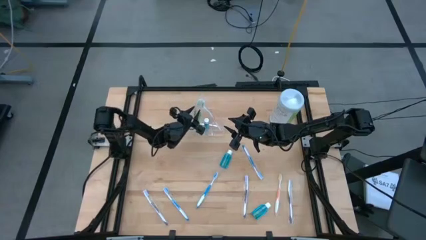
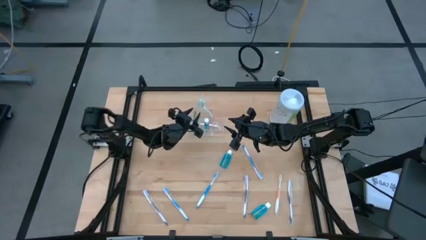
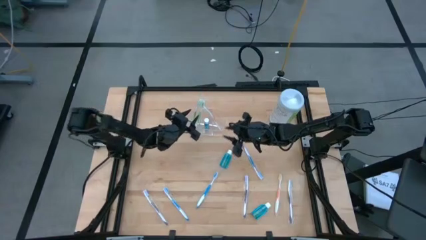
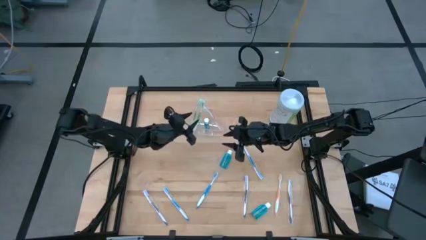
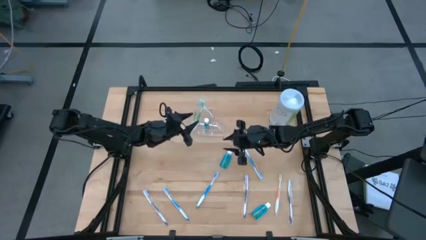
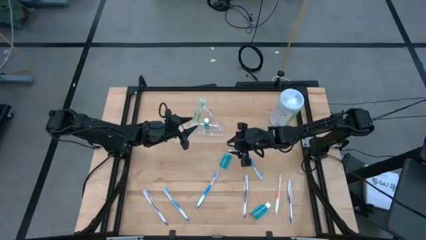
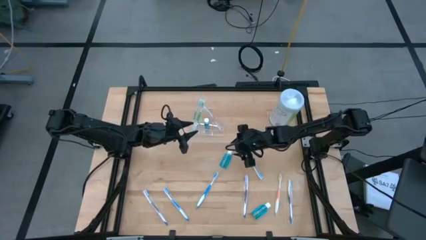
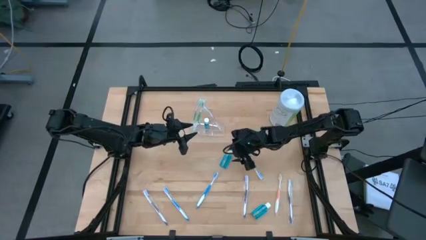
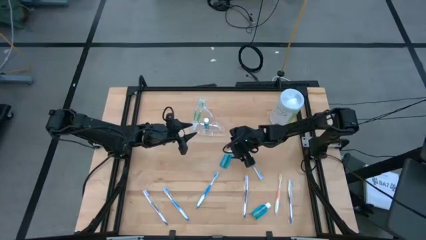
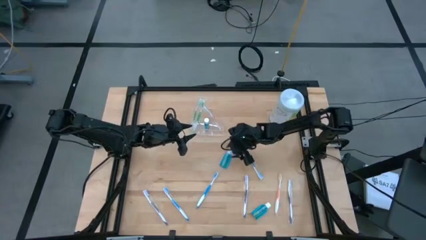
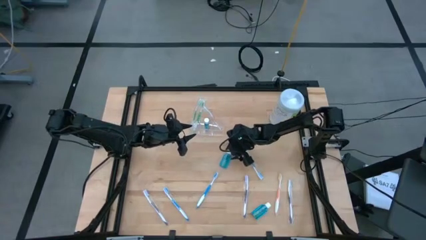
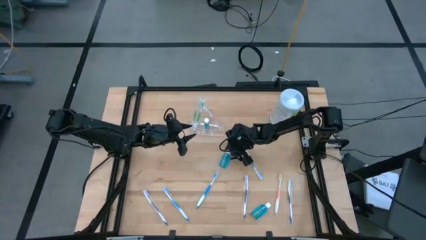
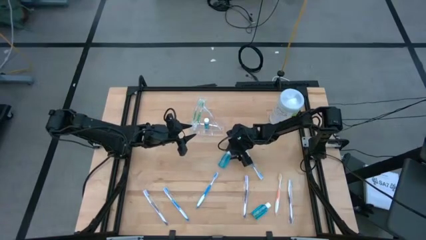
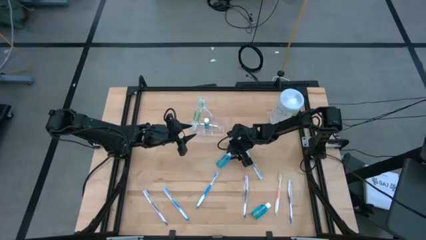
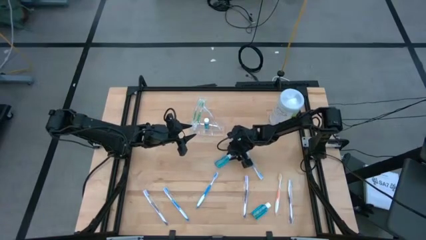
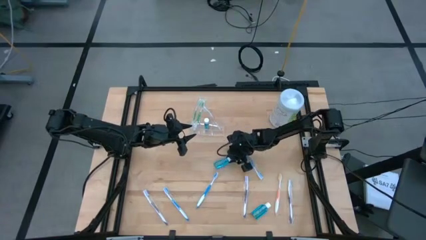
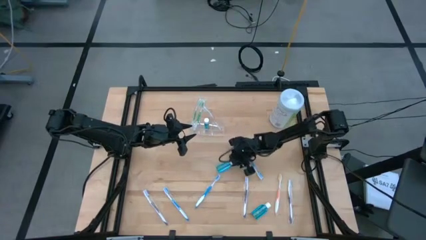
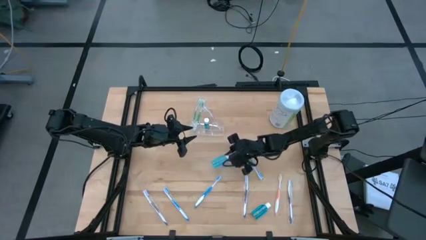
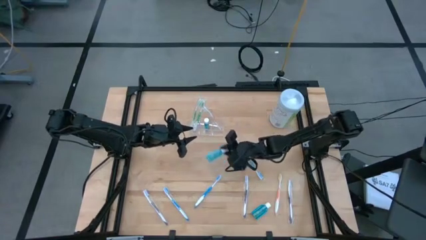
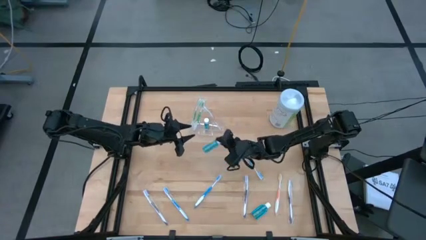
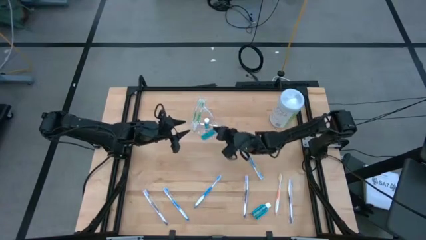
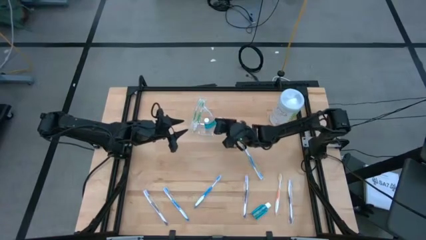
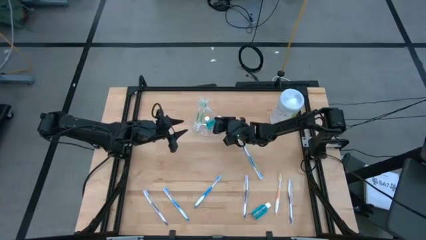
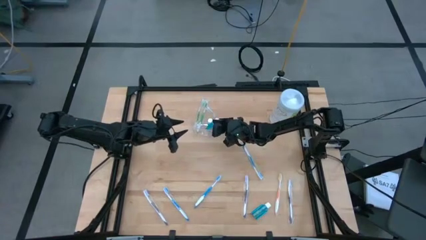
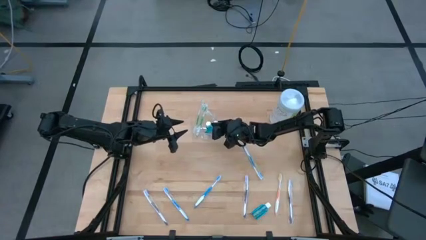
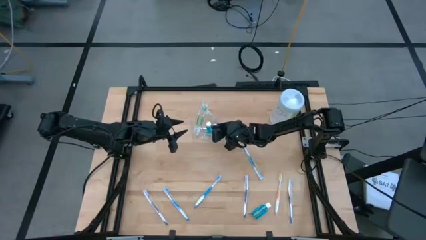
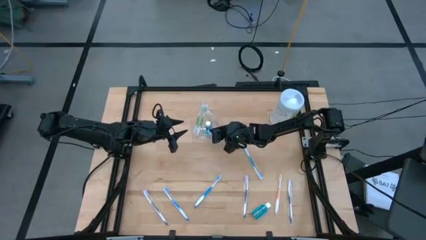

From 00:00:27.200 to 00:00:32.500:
Task: Pick & Place toothbrushing station
Put the blue mouthwash into the middle section of the transparent organizer

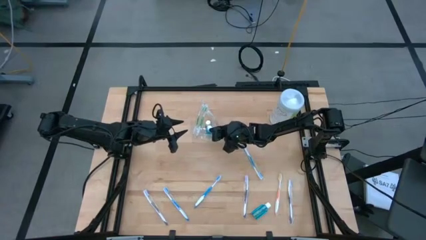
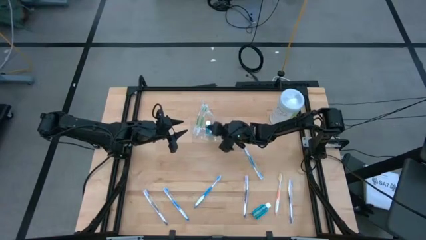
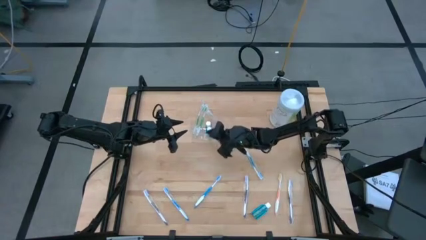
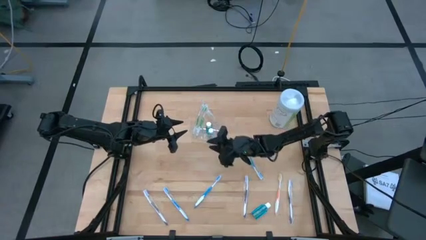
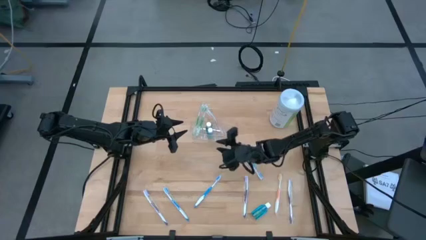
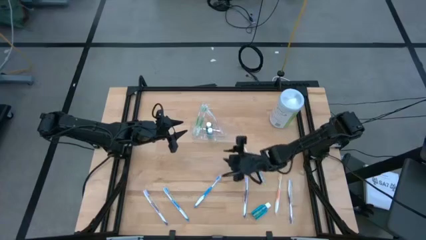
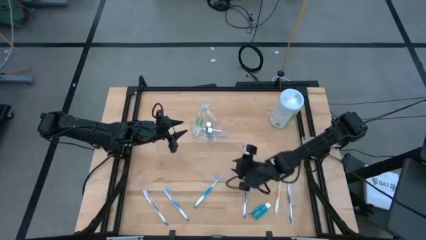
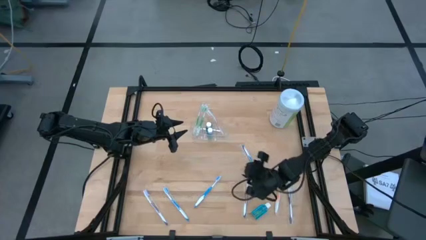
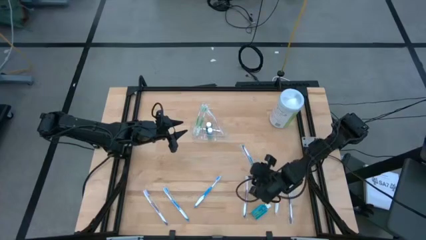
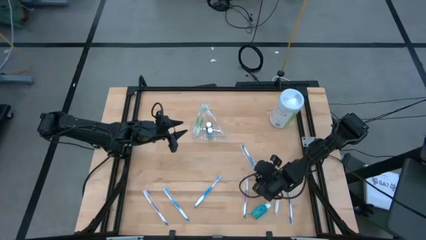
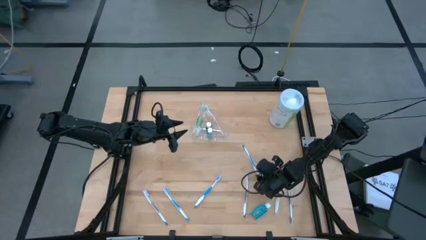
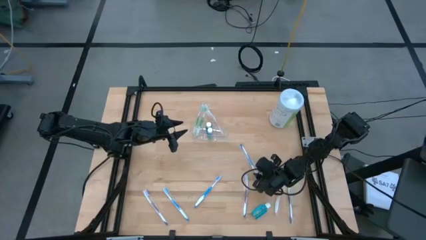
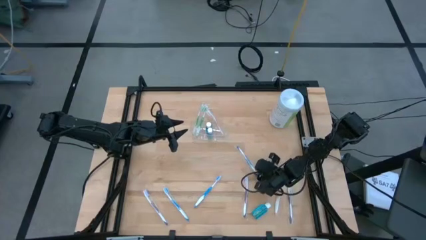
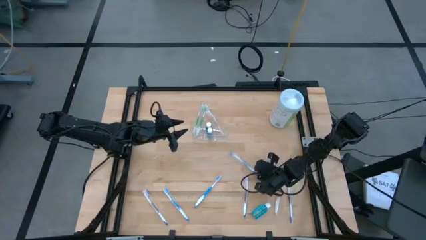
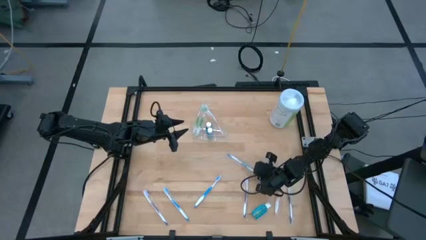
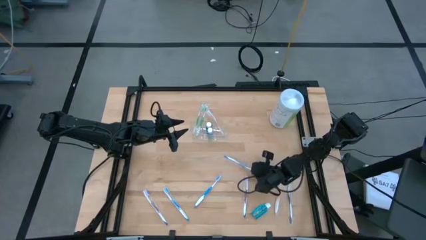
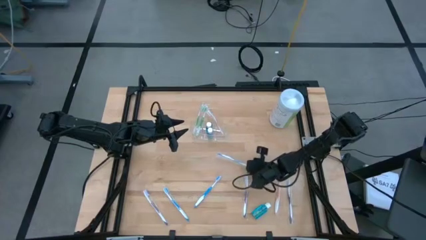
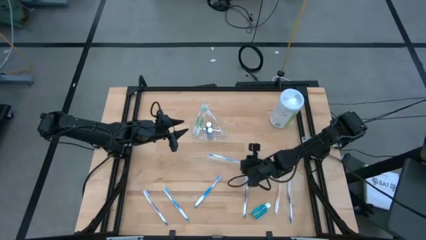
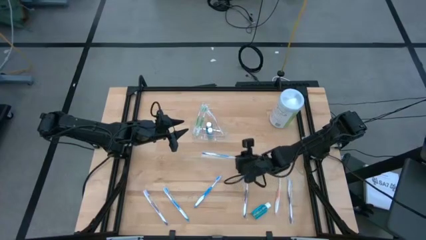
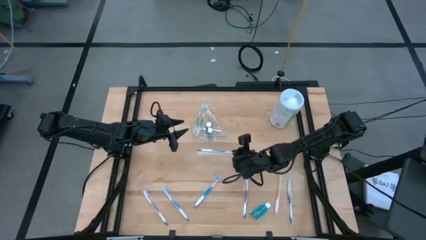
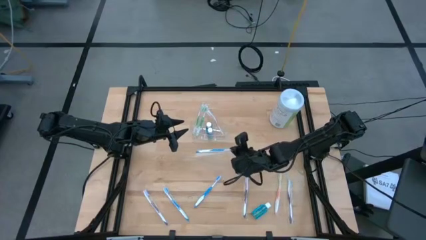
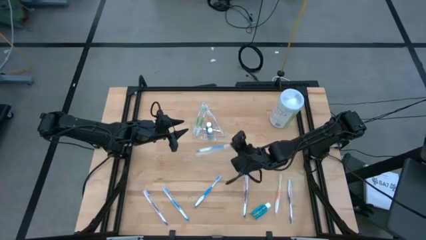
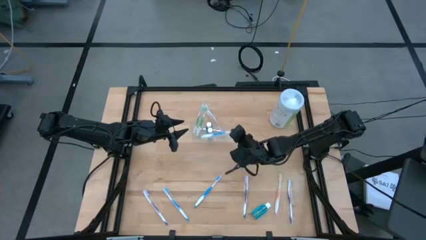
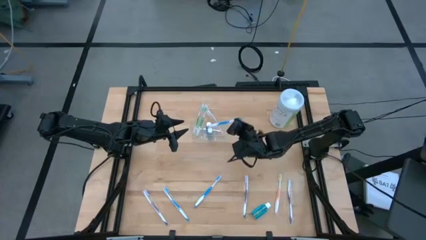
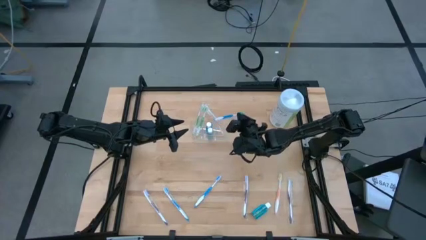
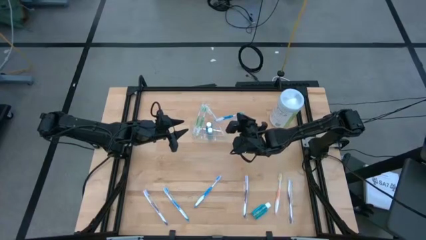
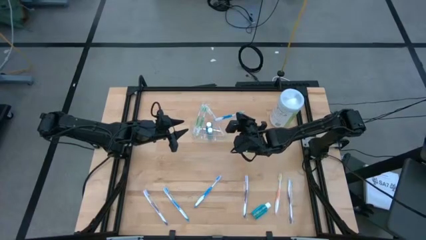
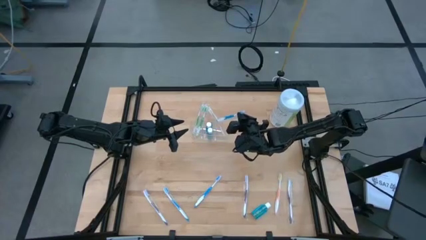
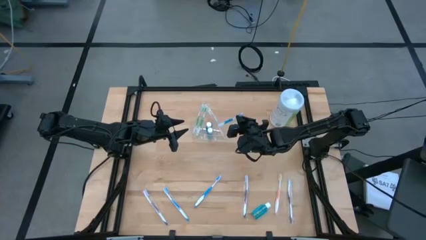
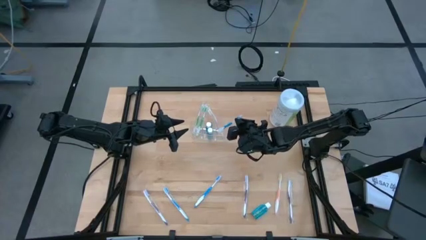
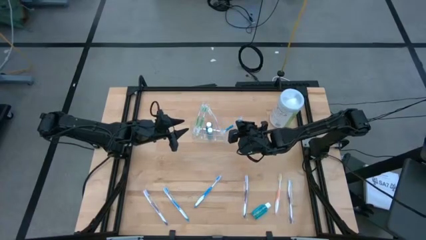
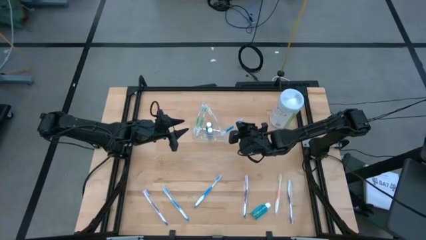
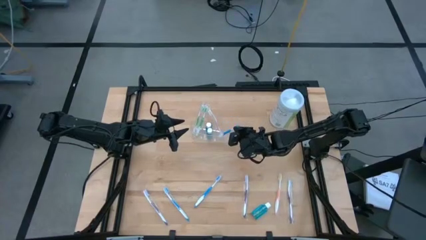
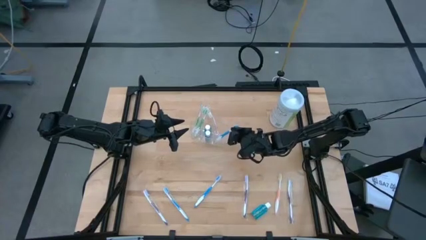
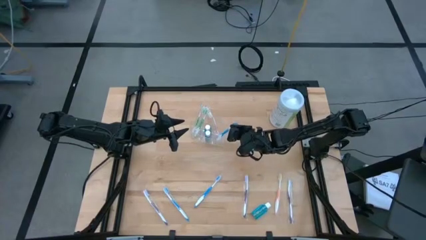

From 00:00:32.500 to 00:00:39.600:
Put the blue toothbrush into the right section of the transparent organizer

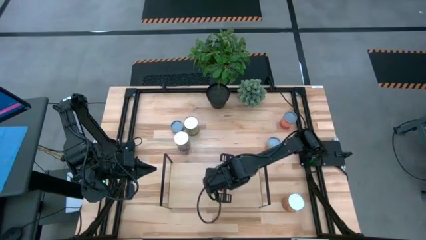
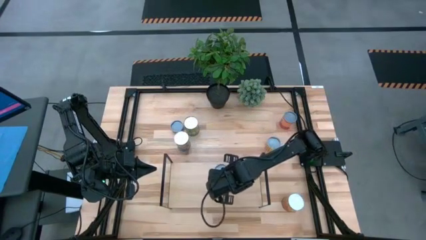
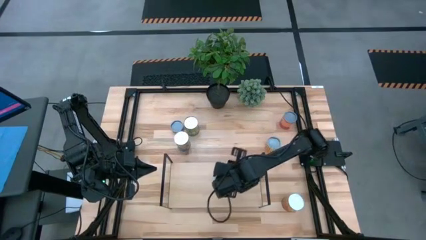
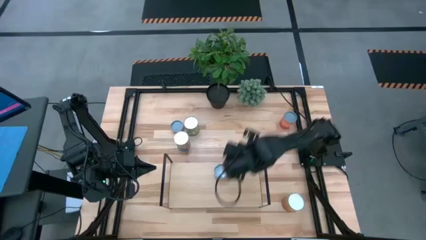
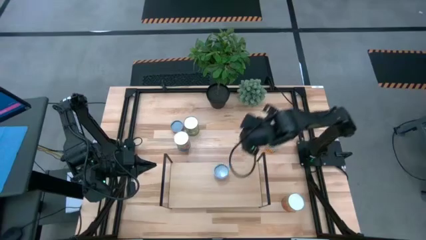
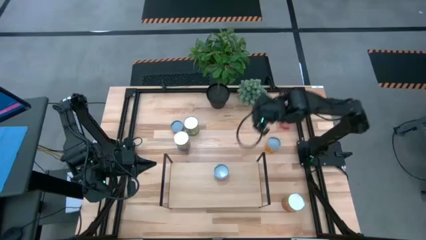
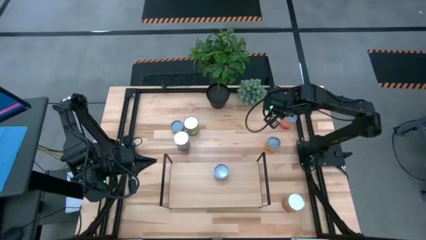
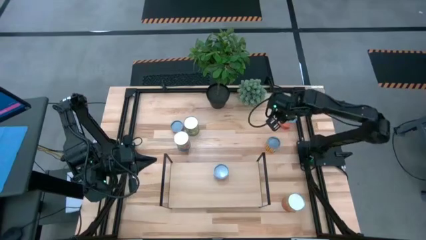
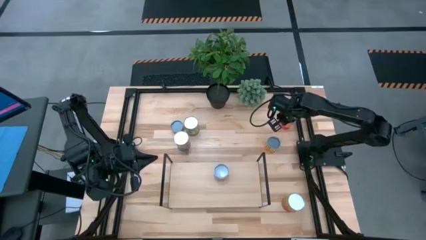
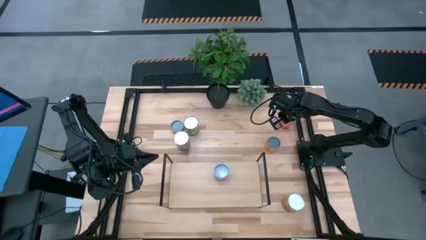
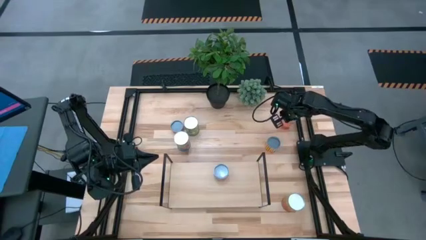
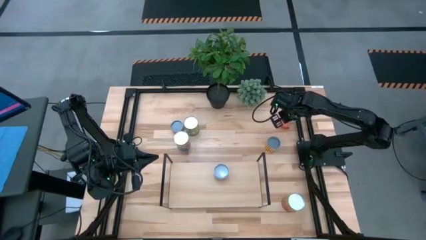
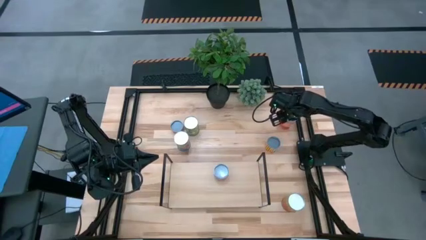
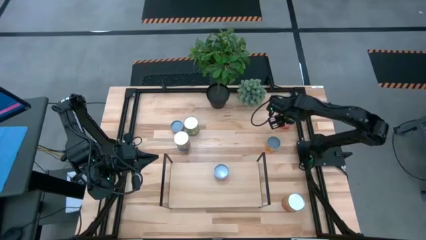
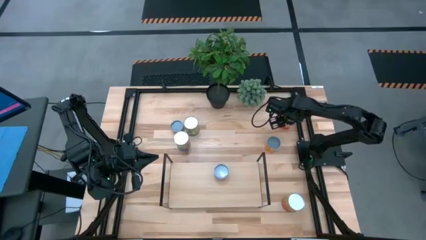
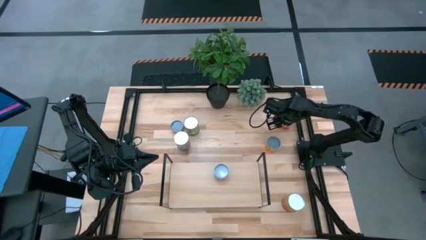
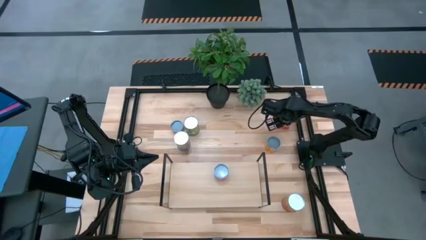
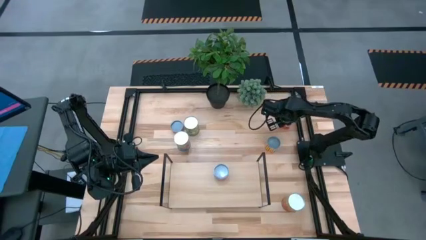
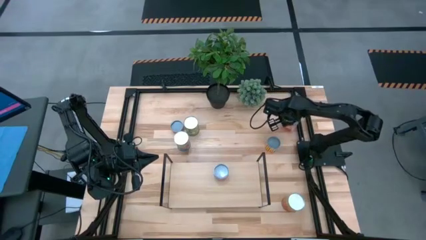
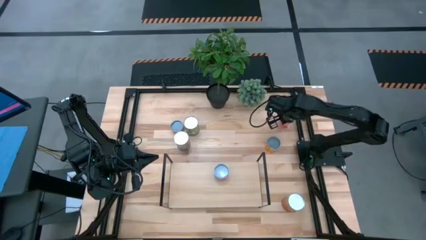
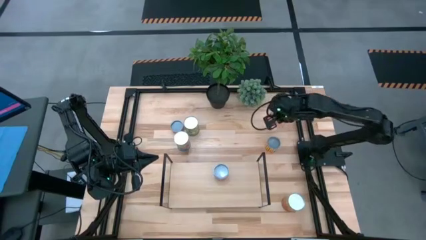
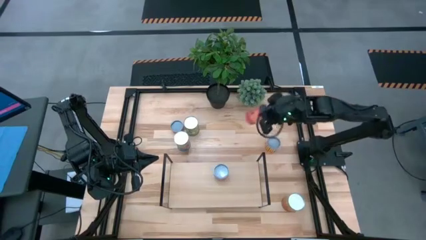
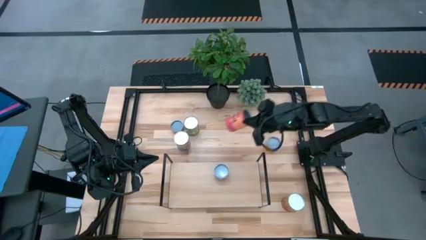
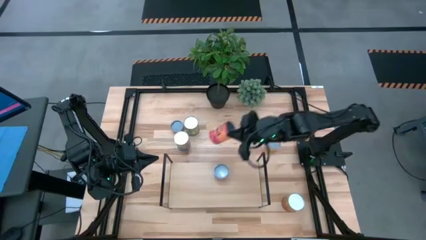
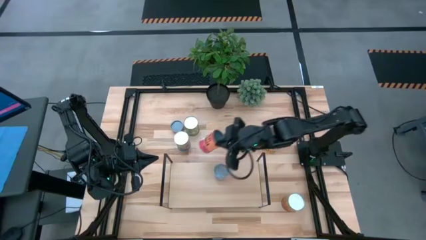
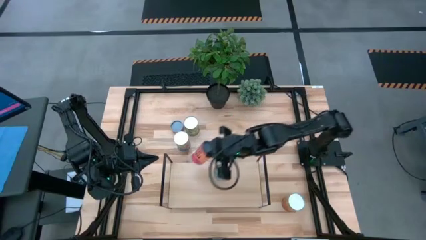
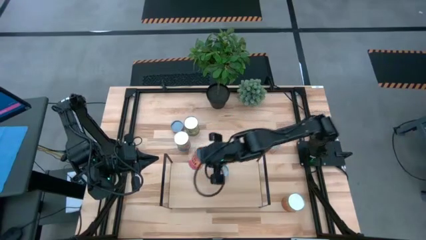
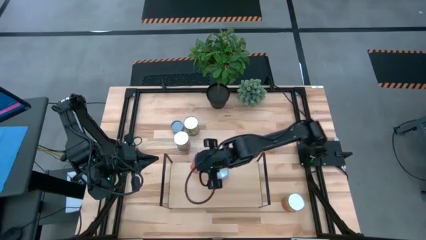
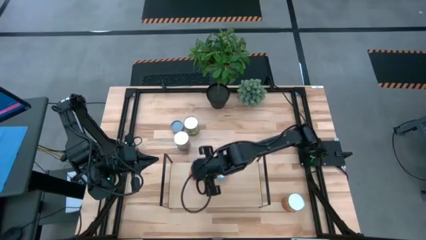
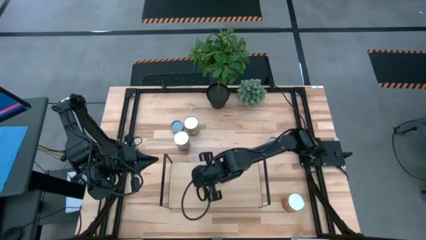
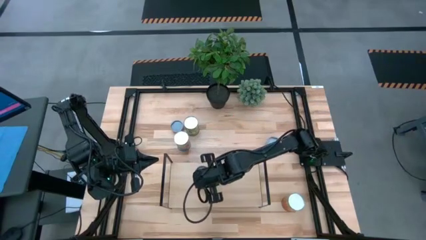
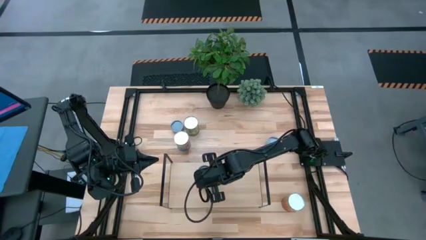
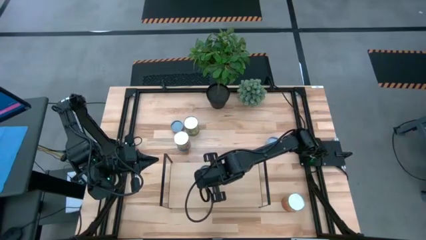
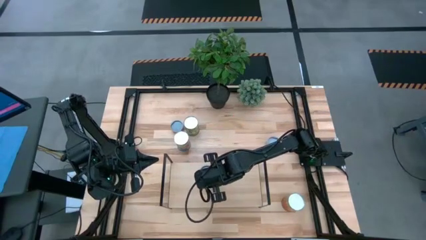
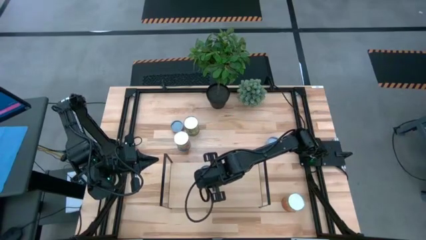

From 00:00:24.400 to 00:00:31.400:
Task: Pick and place cans onto a shelf
Put the orange mix fruit can on the shelf
